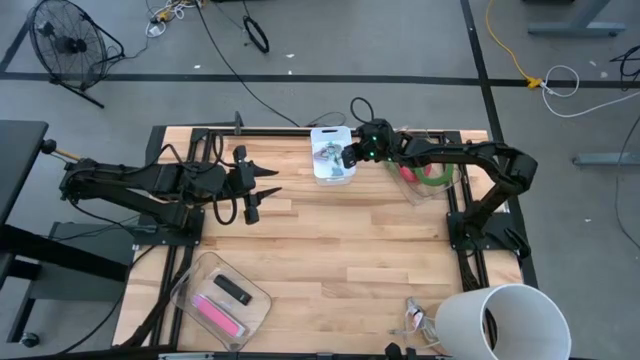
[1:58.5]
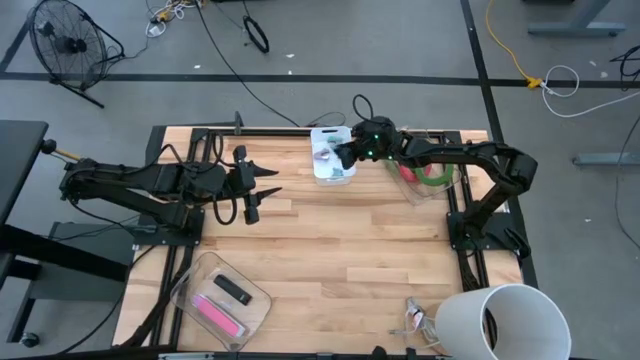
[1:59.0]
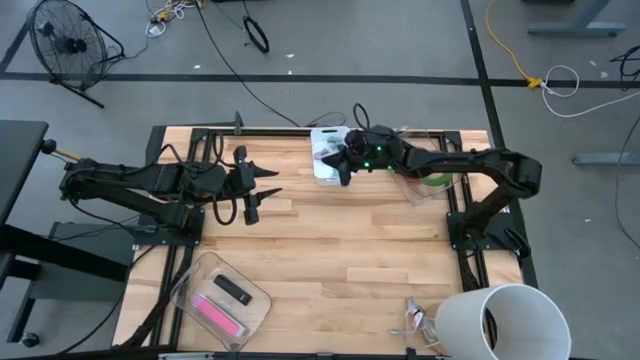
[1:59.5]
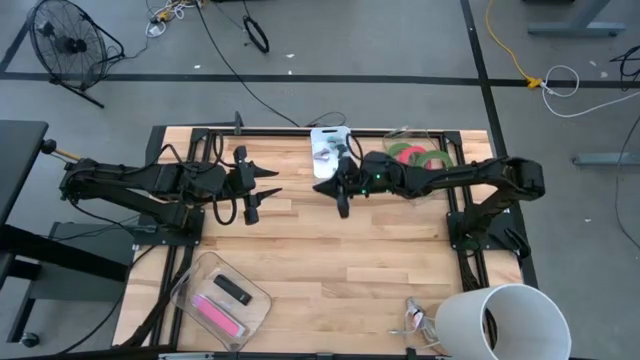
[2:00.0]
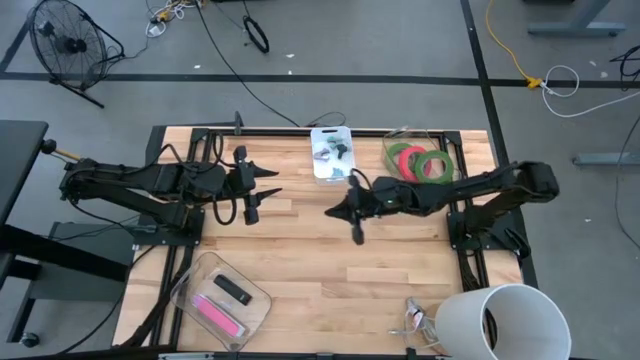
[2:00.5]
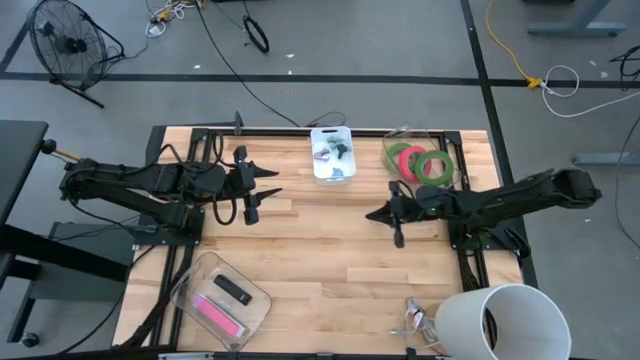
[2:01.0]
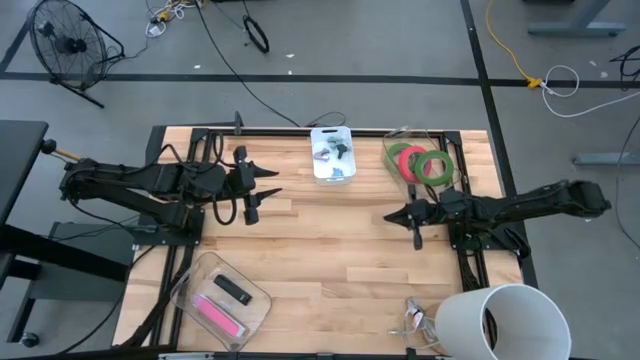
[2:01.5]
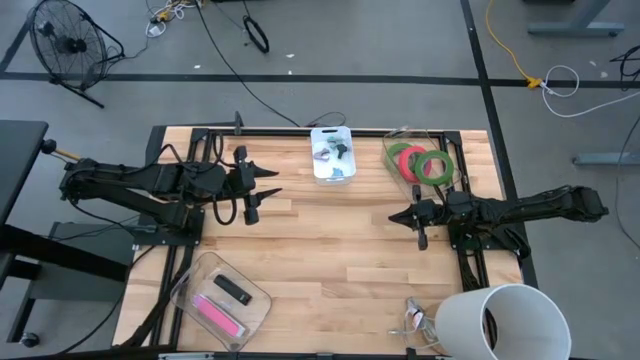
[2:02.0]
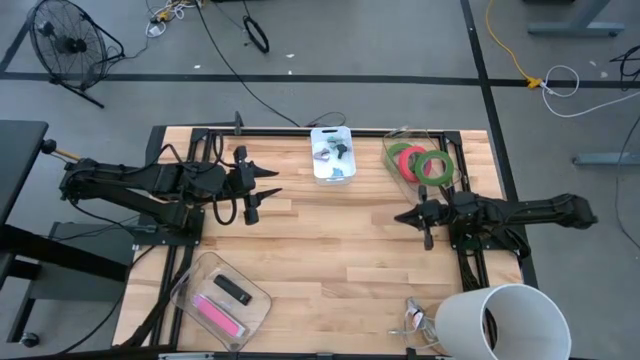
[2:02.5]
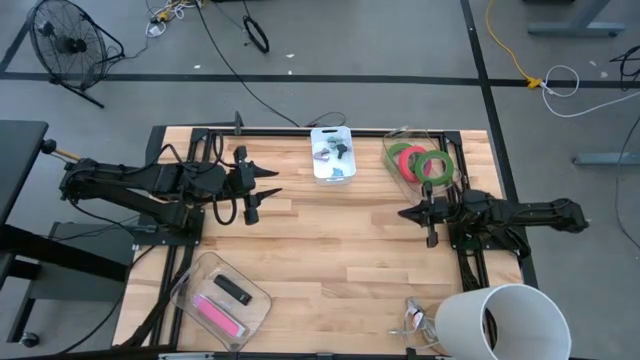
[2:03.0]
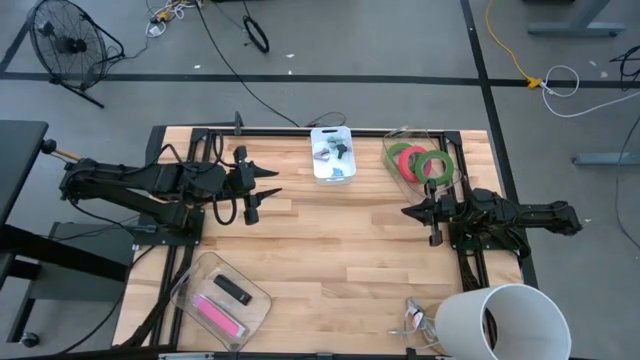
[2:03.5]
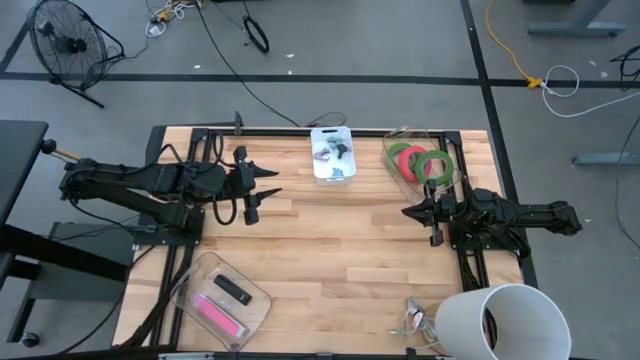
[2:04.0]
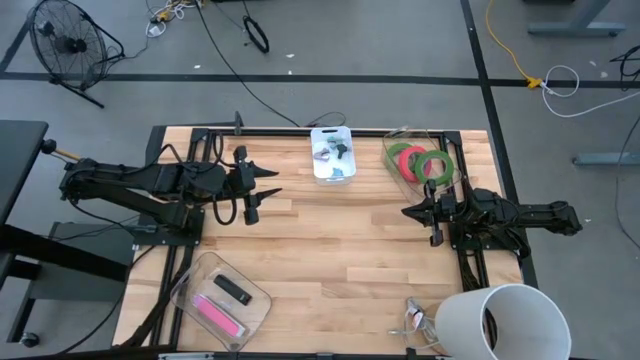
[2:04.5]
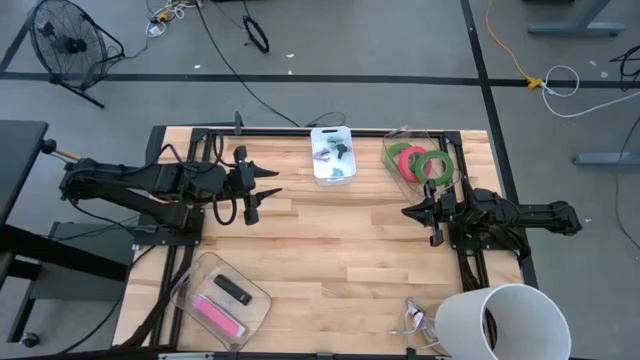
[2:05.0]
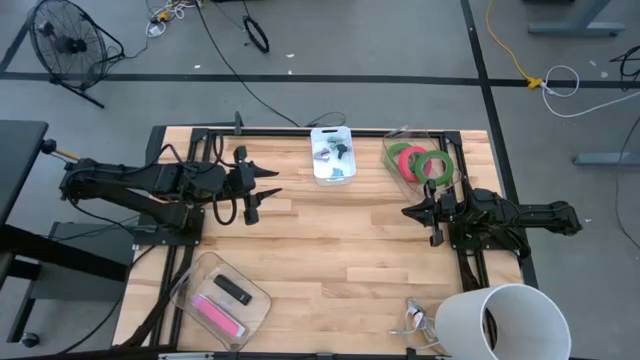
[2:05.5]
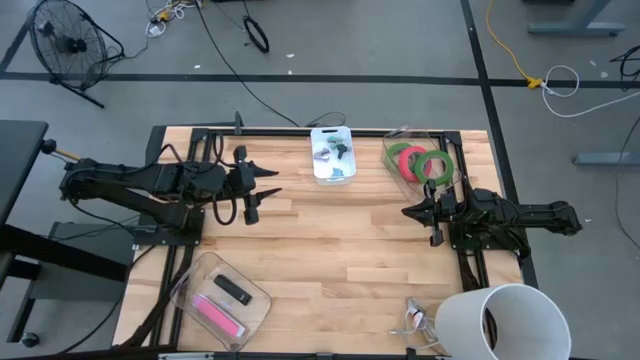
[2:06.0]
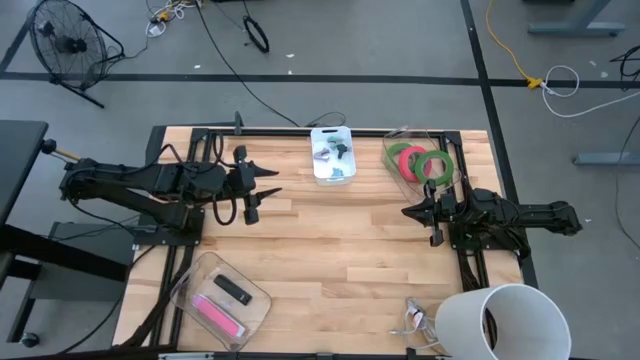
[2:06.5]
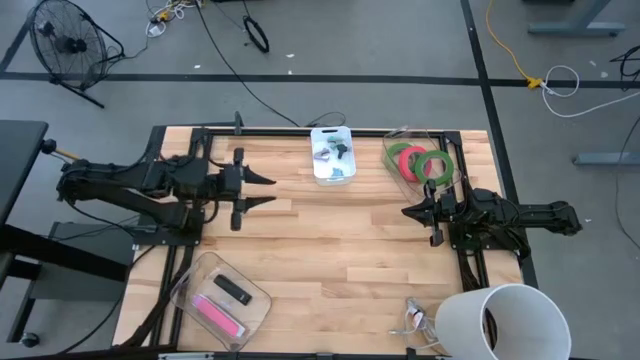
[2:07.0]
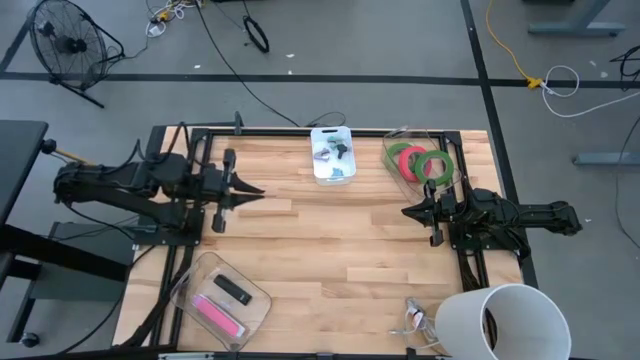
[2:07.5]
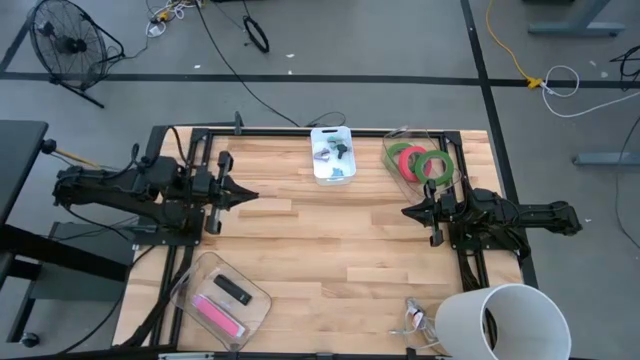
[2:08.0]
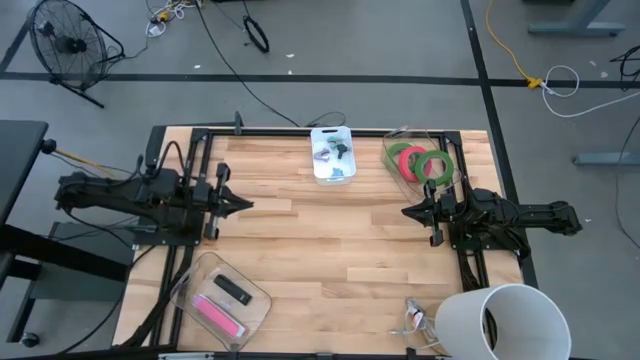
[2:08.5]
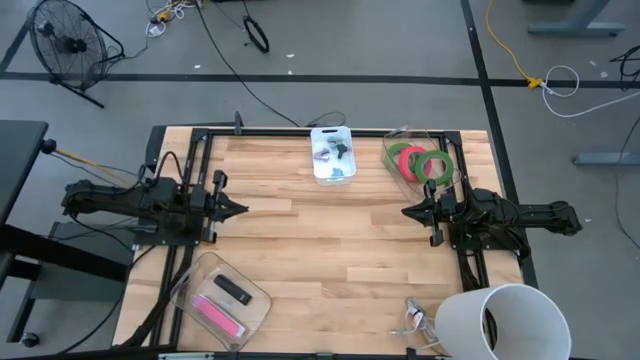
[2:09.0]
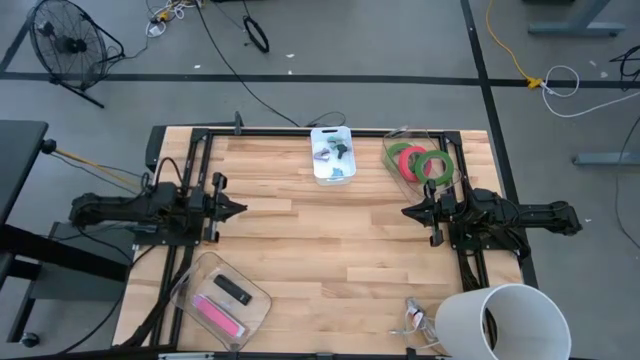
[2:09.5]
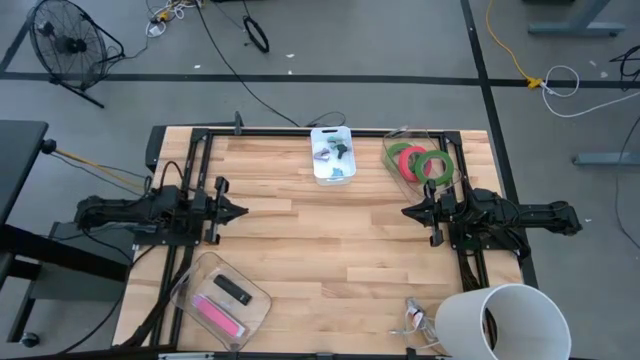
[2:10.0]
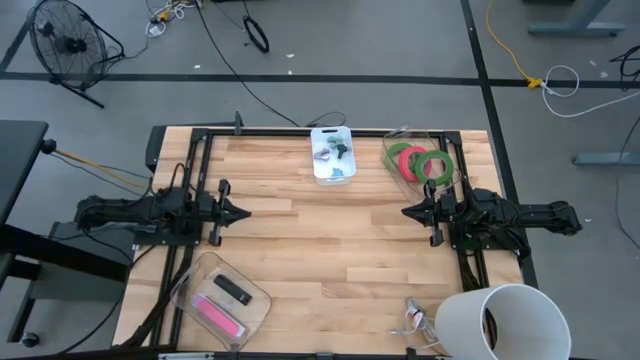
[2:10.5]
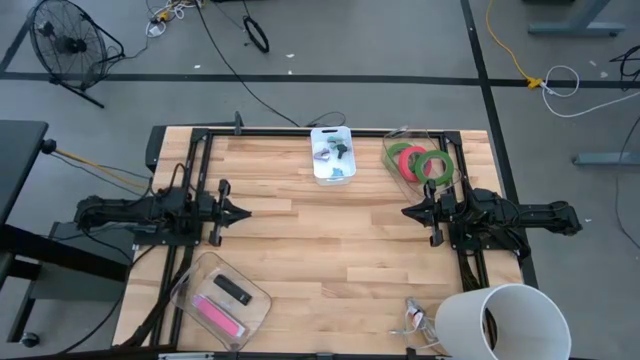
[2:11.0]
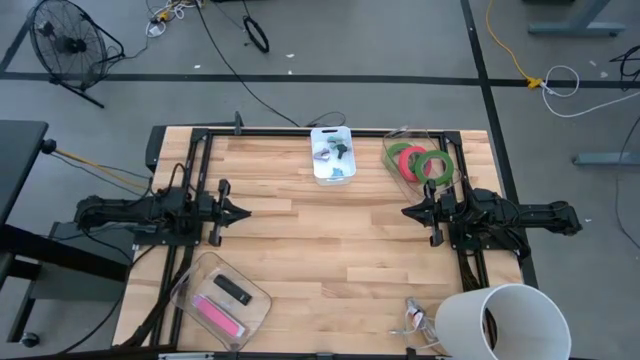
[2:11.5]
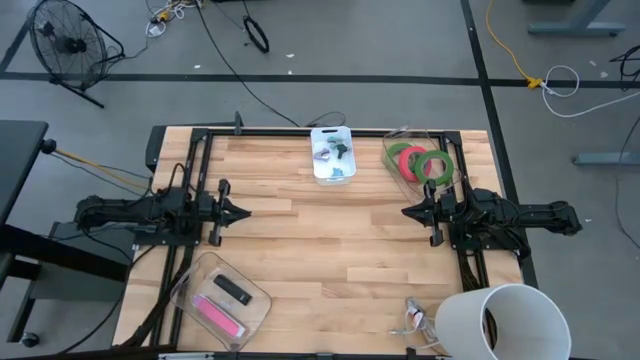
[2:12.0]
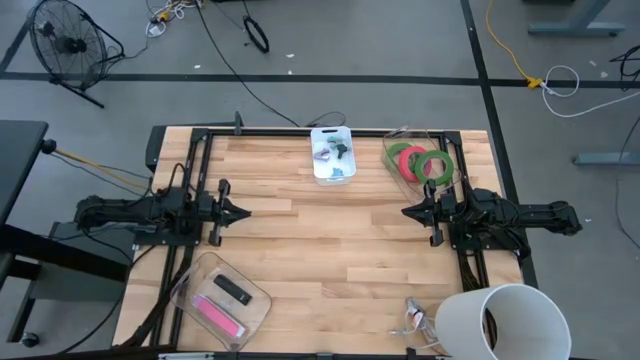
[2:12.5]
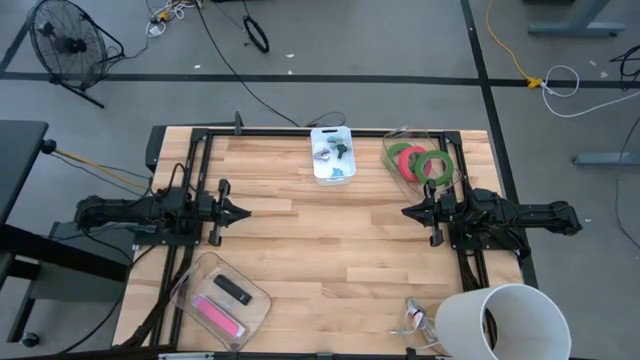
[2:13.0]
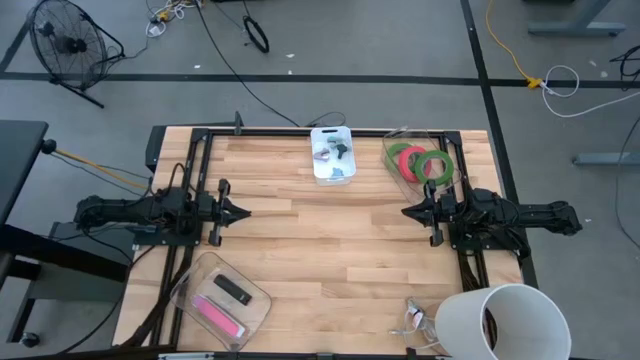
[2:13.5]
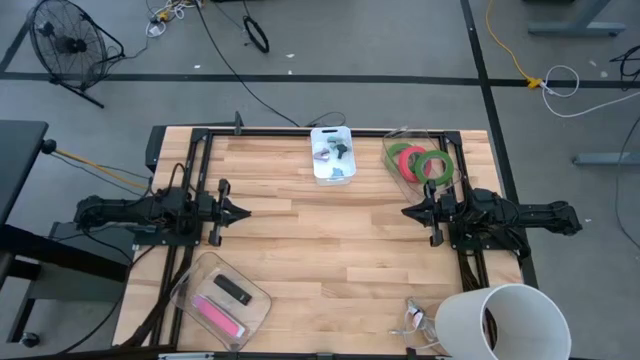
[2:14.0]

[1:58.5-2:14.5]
Task: Pick and place Stapler, Stapler remover, tape
Return to Home Position

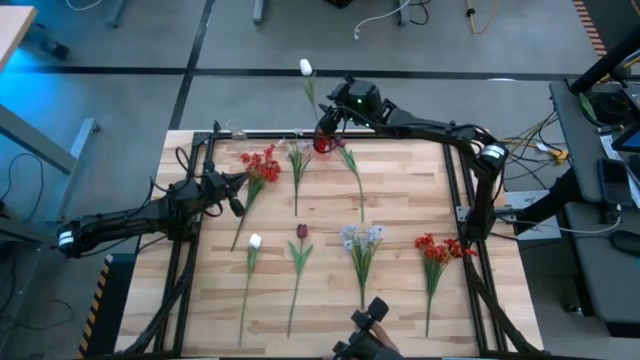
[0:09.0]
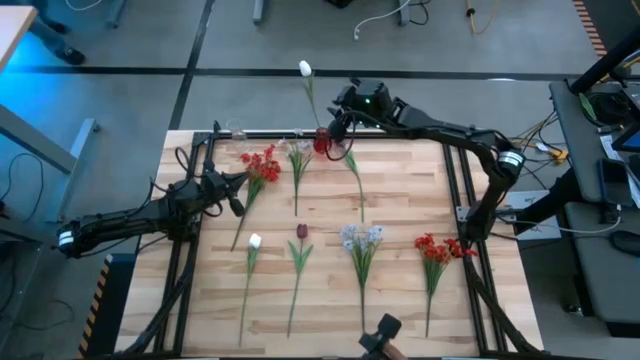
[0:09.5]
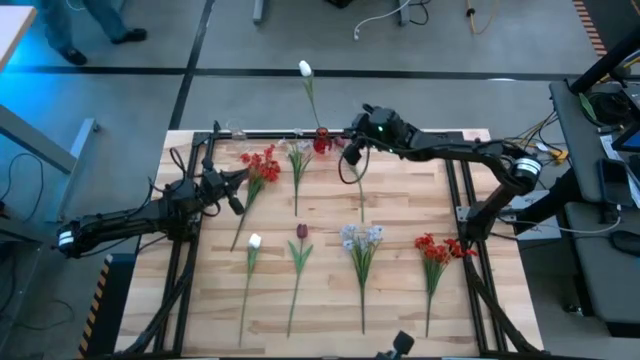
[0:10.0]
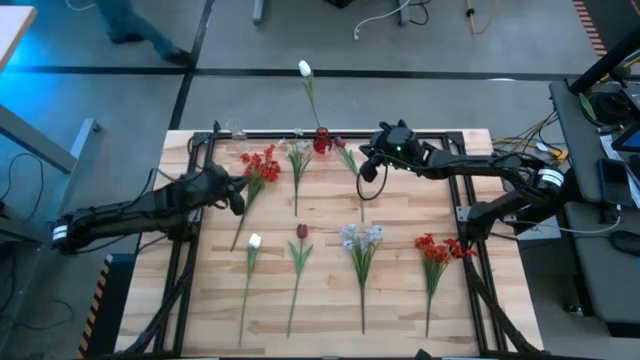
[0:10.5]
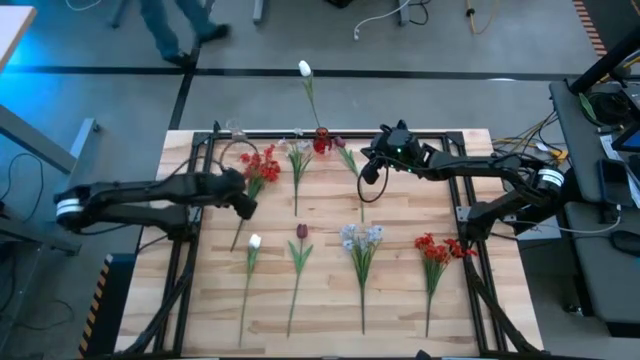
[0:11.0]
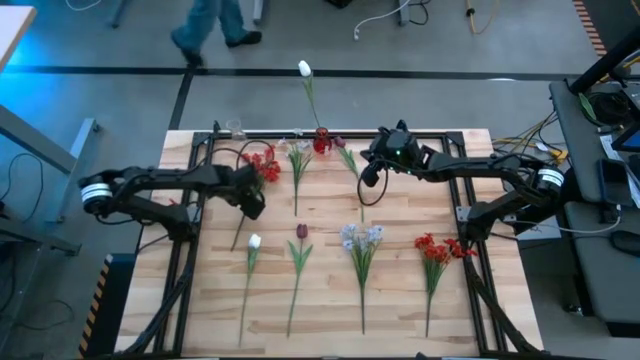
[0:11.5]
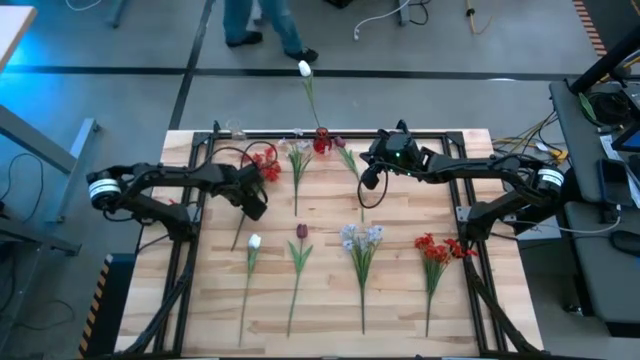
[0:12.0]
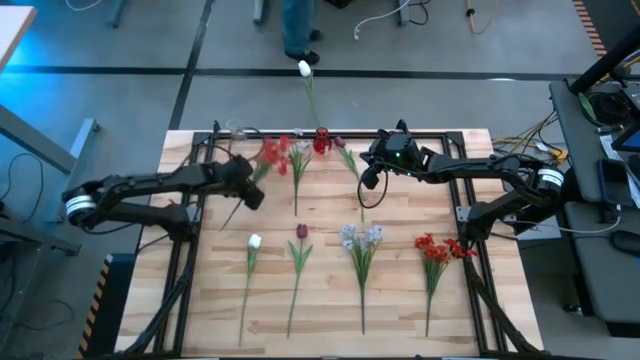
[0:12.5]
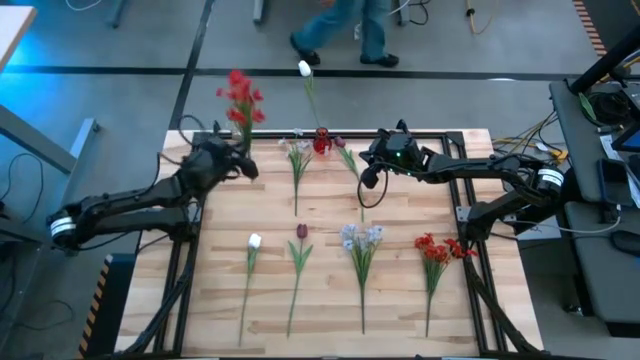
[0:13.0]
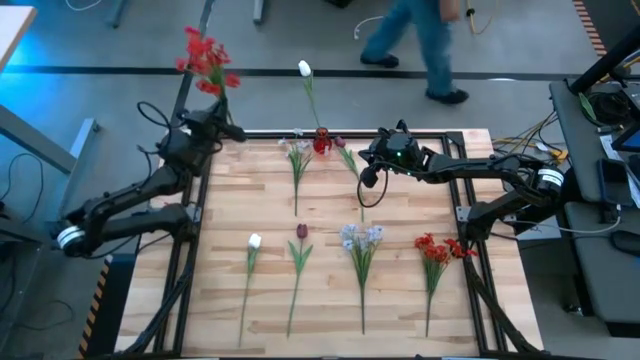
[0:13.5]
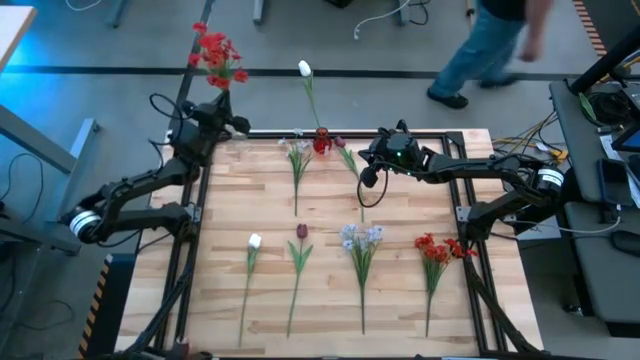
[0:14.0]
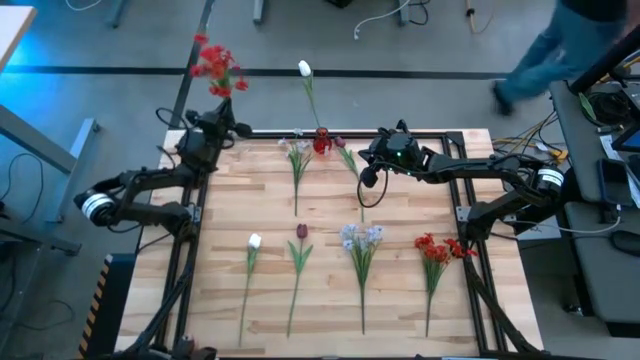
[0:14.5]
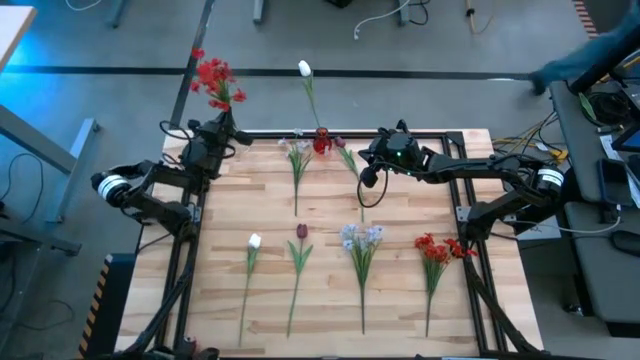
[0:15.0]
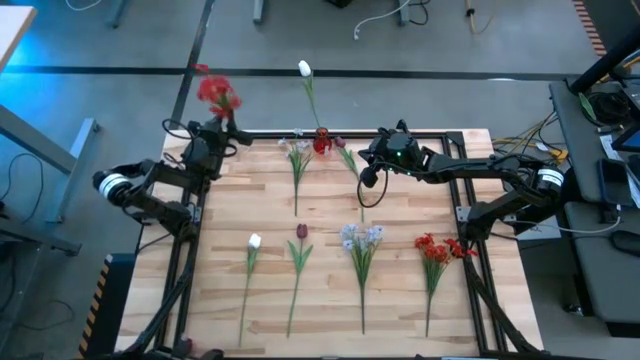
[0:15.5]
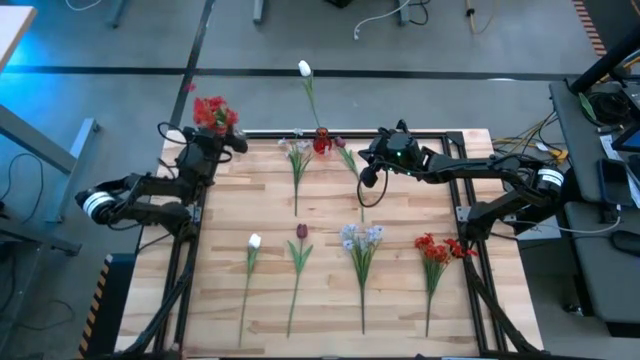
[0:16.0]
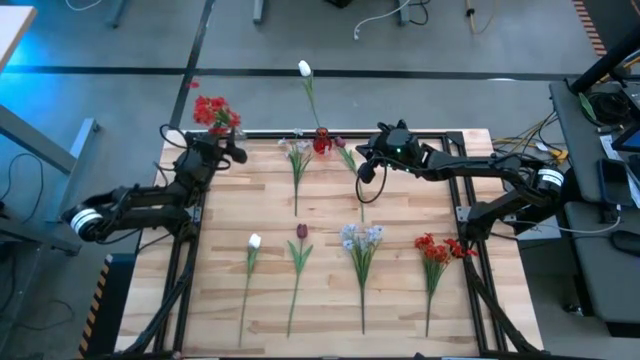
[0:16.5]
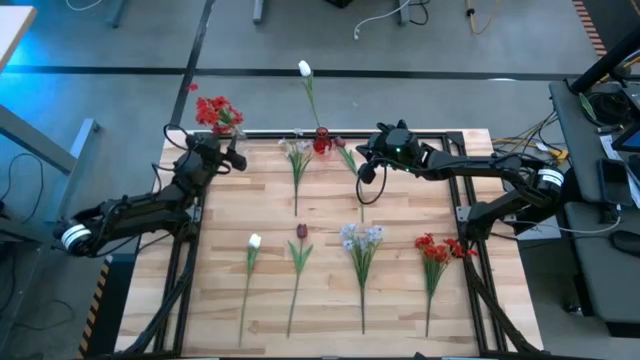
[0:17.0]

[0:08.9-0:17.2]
Task: Sort flowers into vase by color
Put the top red flowers into the transparent vase
